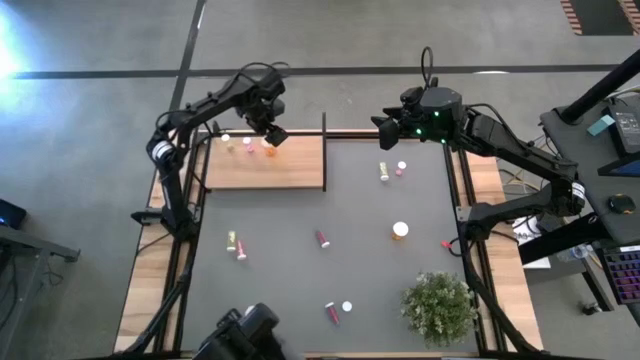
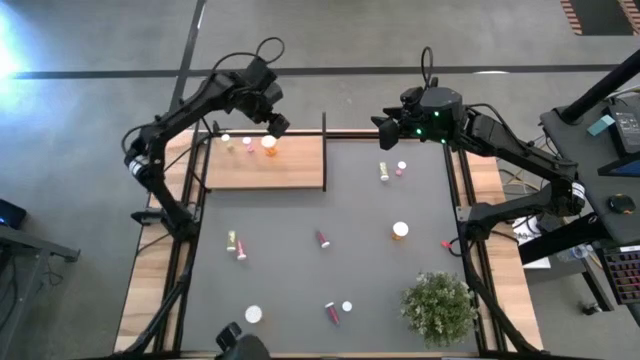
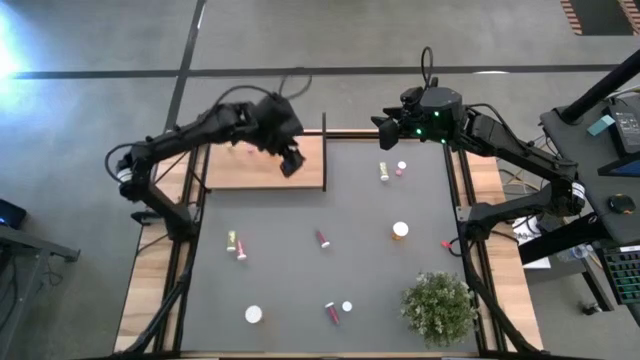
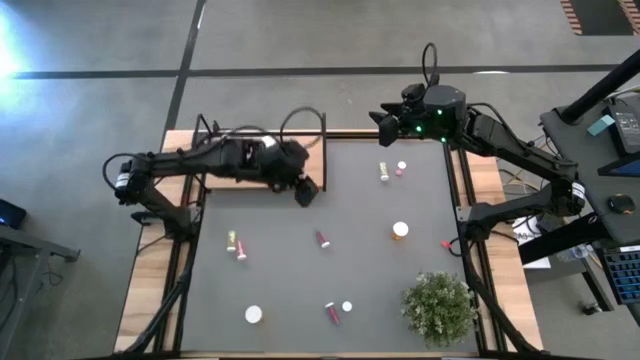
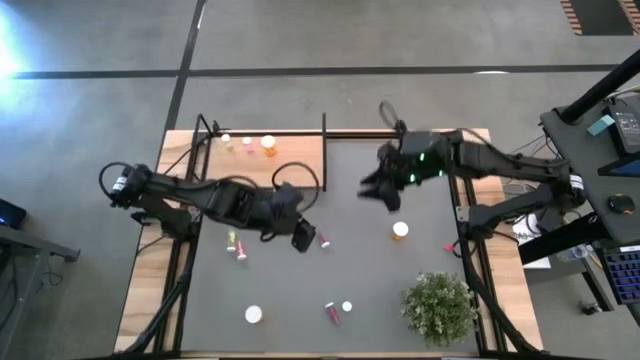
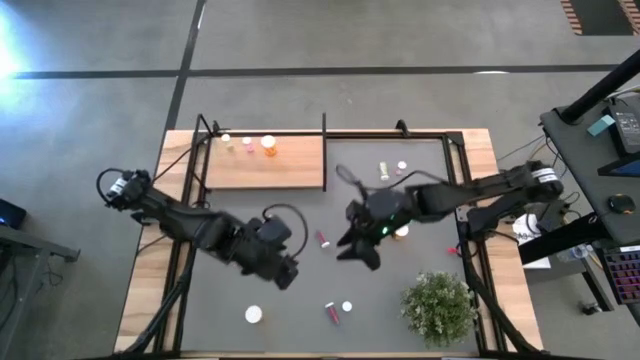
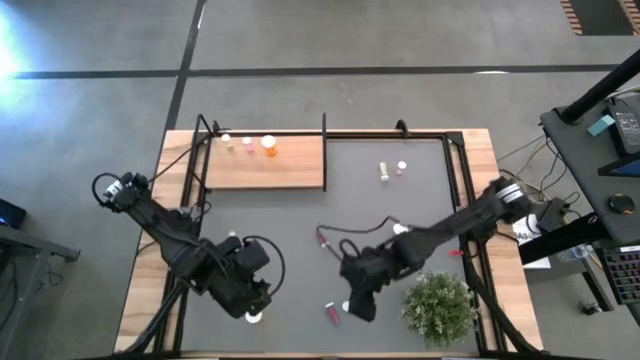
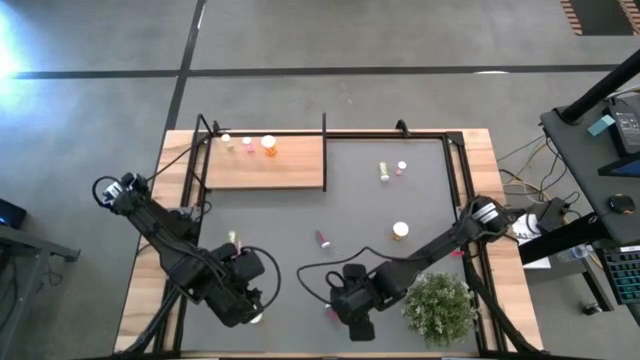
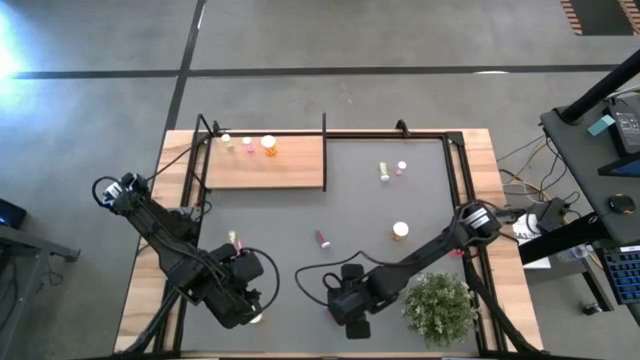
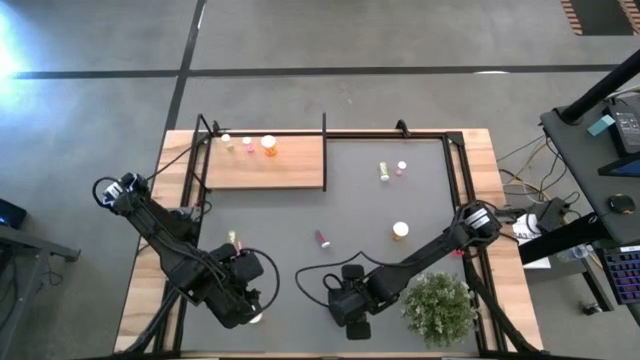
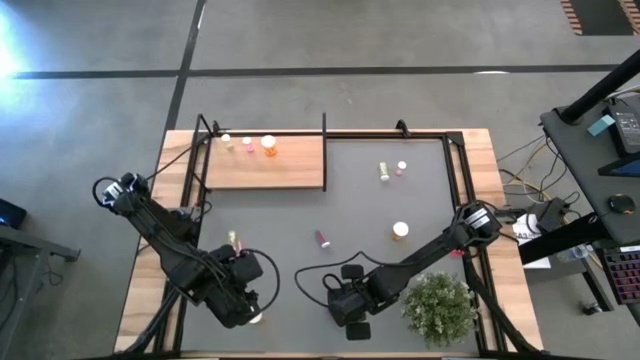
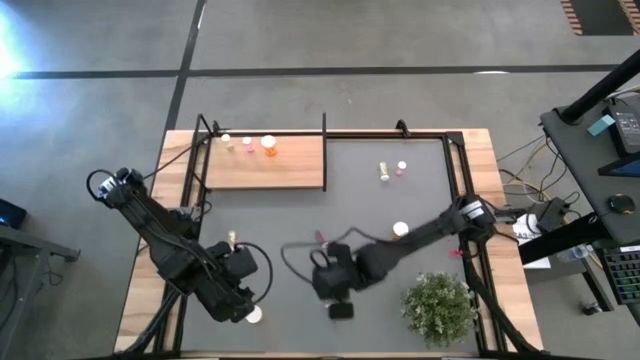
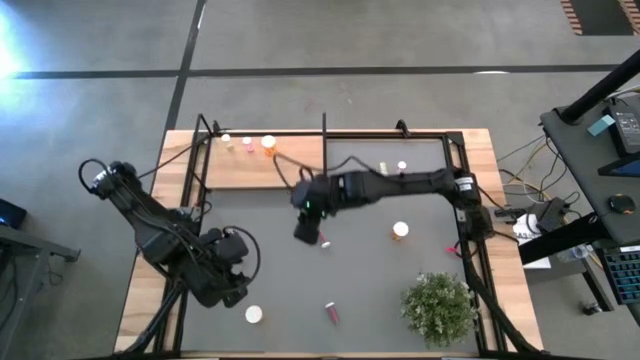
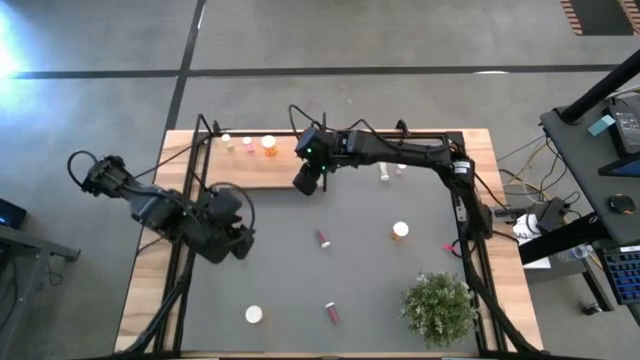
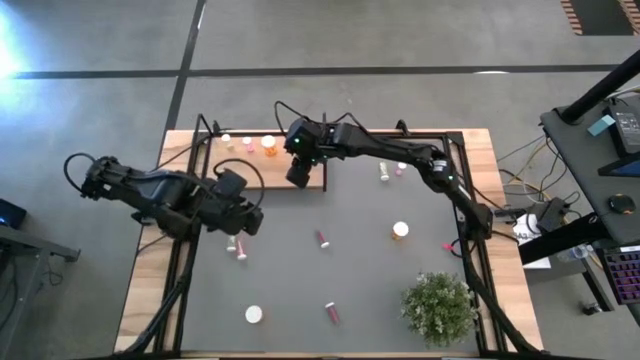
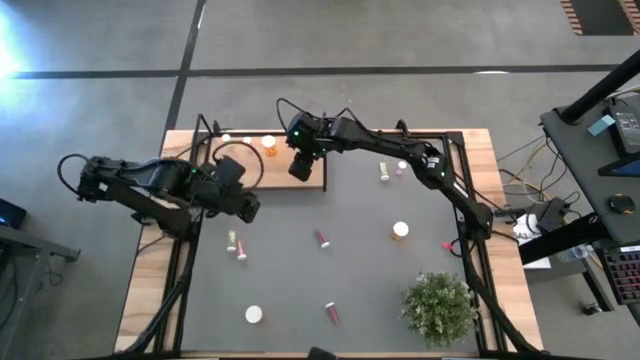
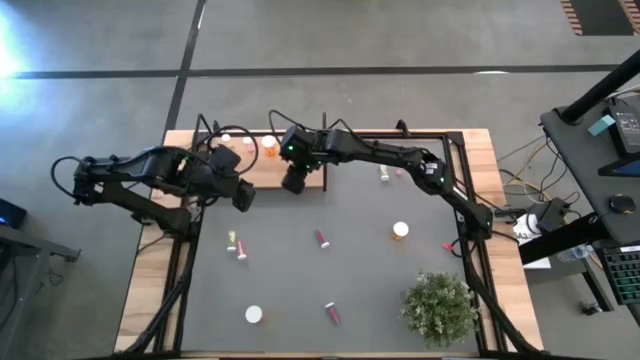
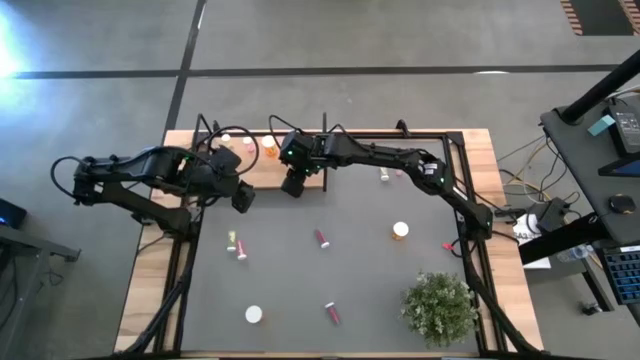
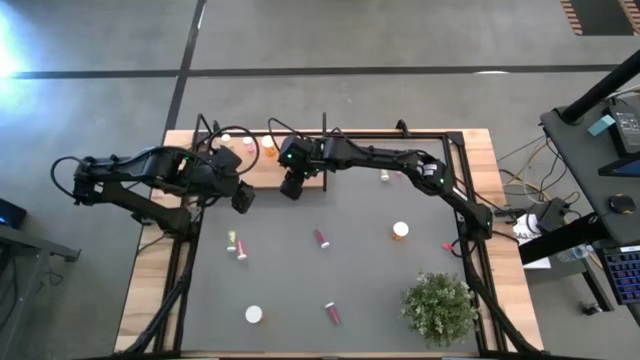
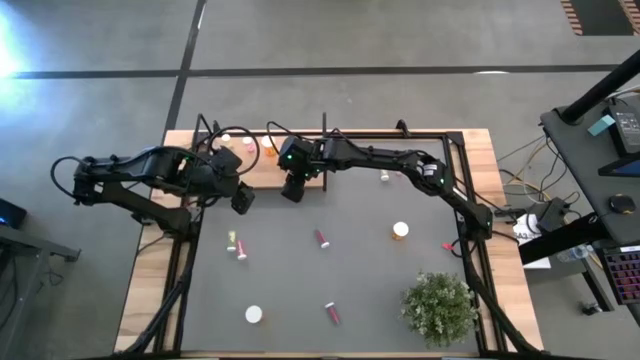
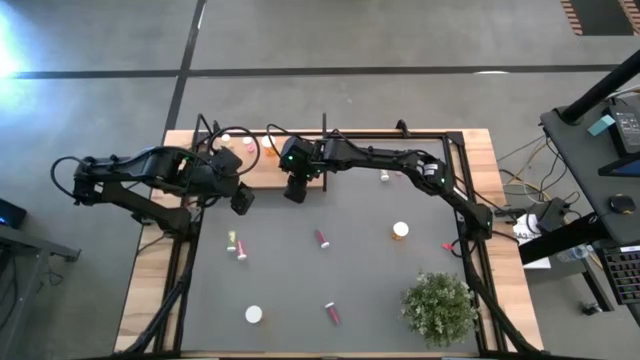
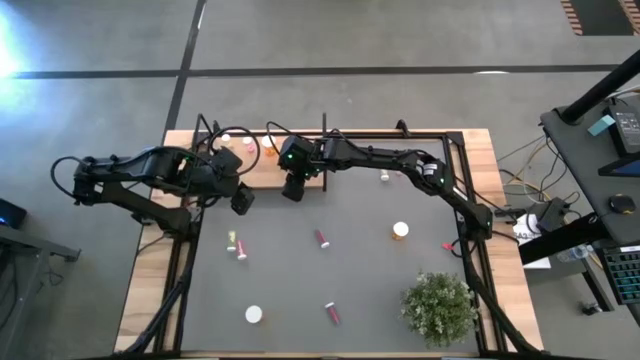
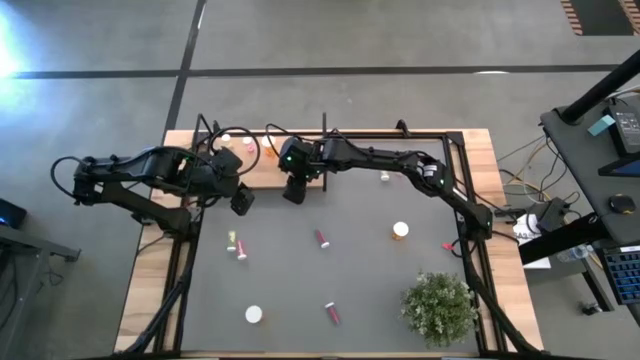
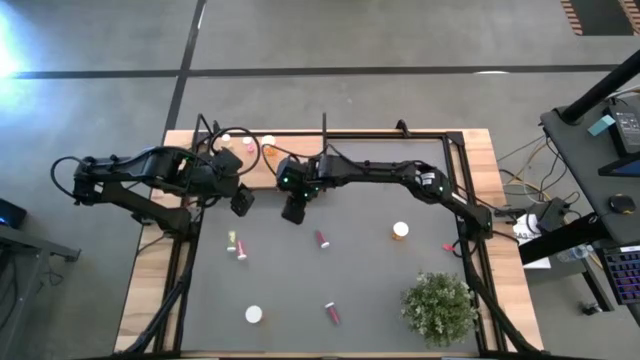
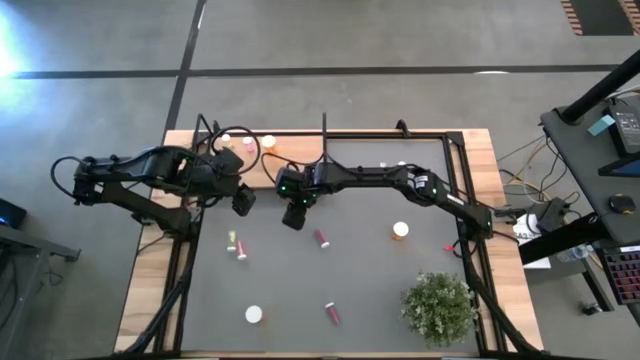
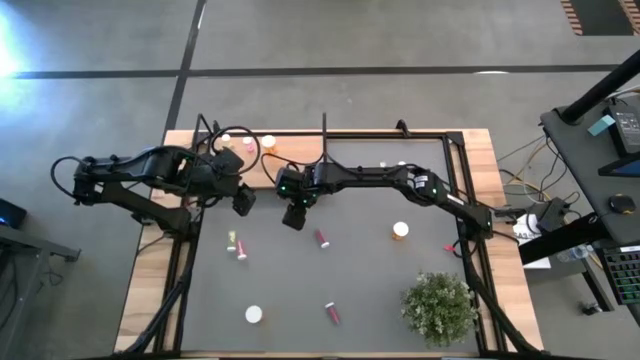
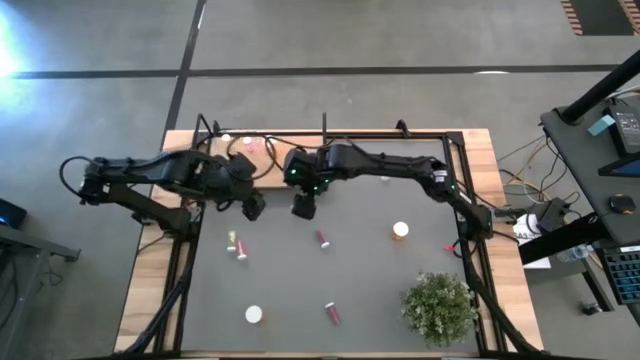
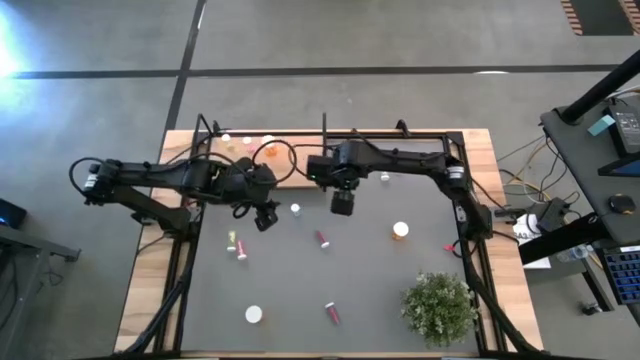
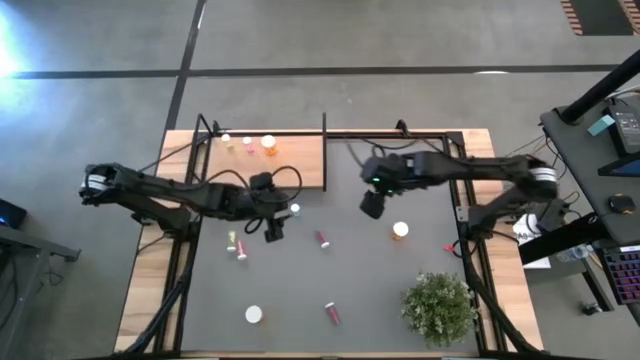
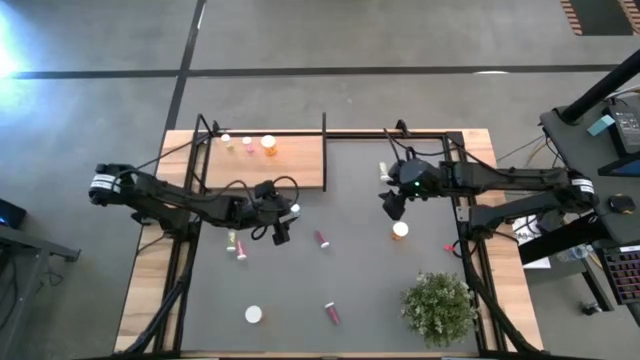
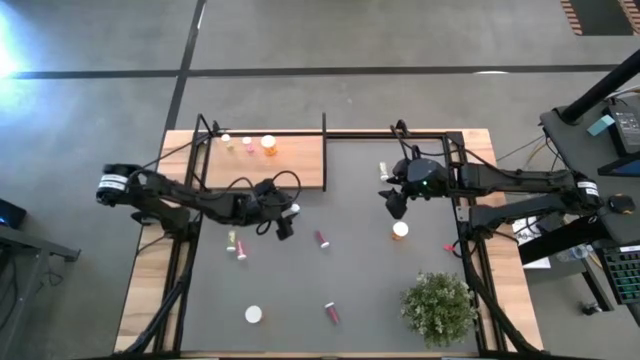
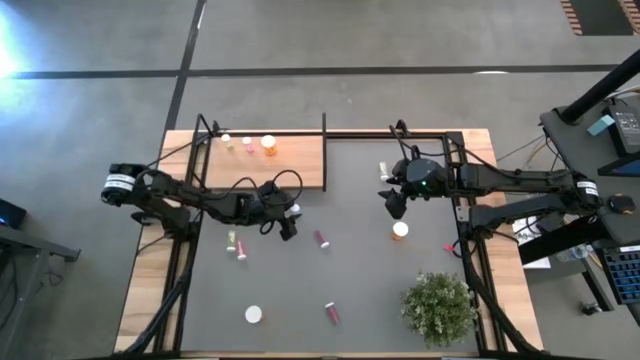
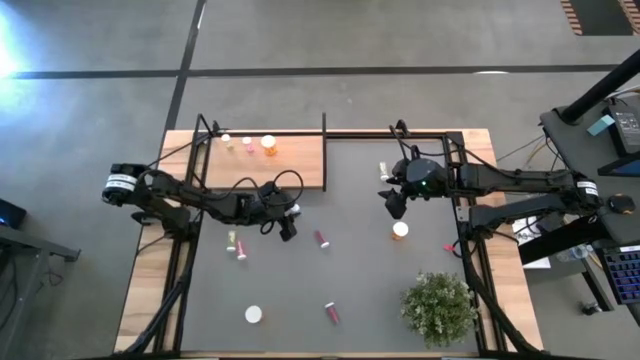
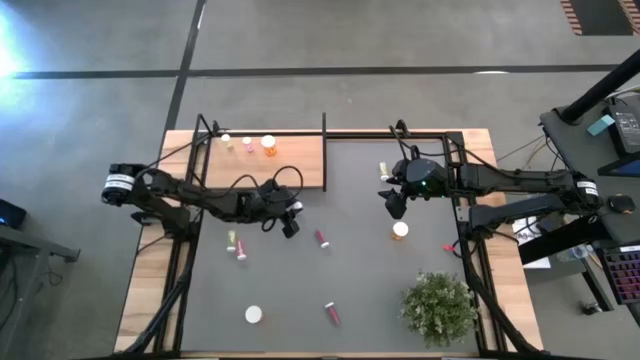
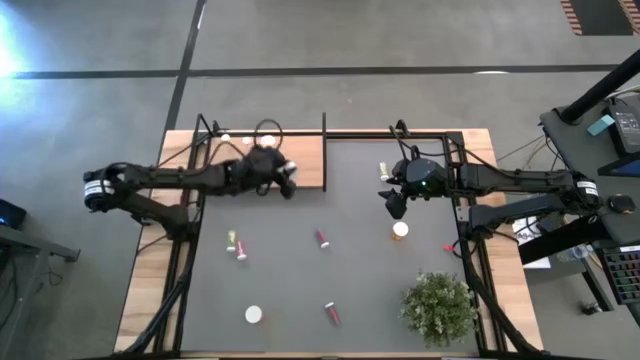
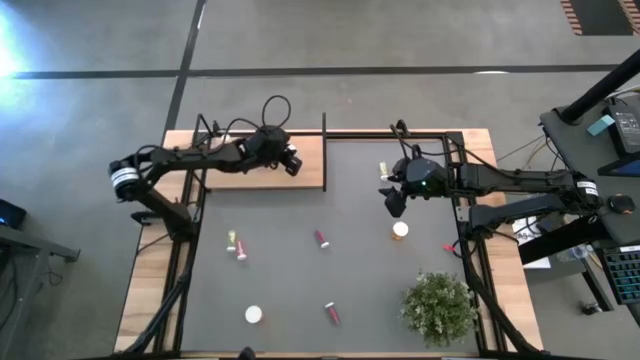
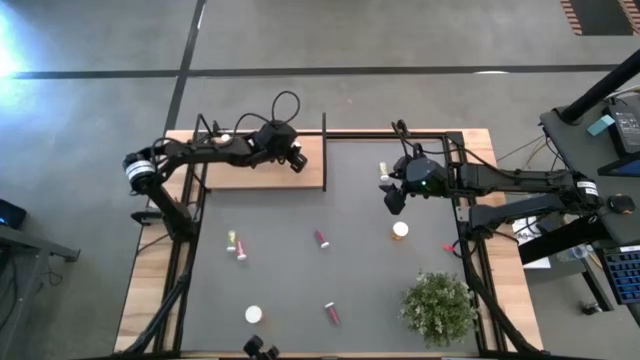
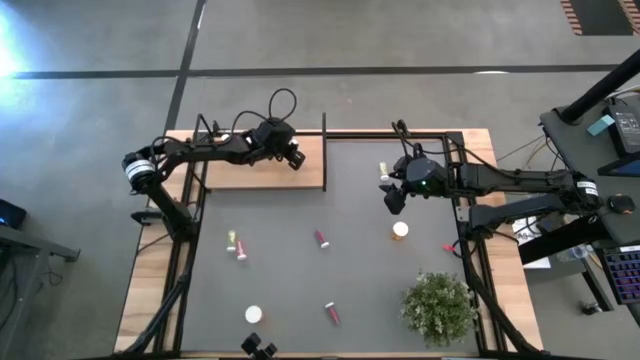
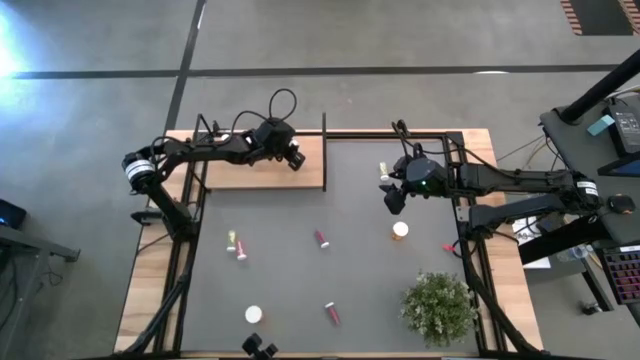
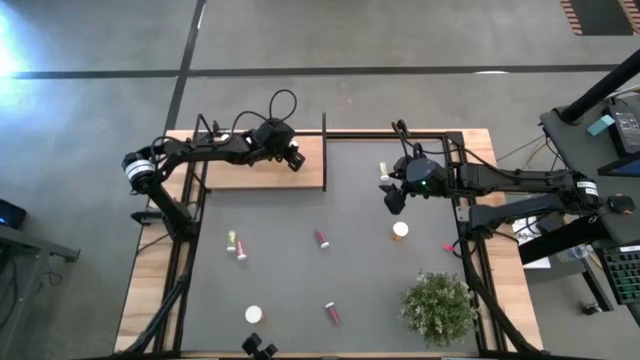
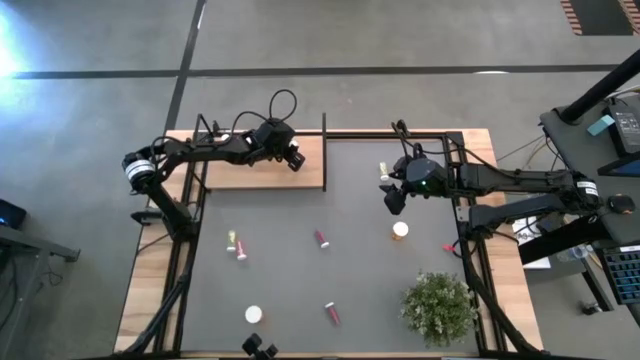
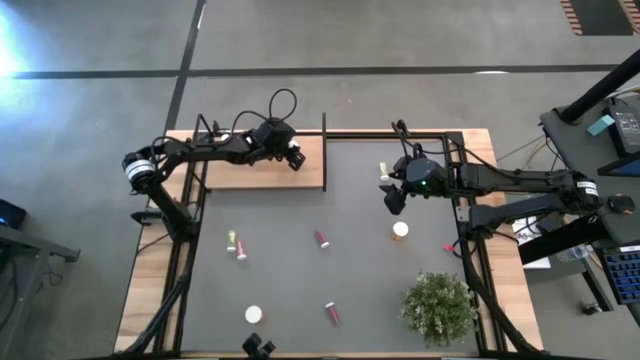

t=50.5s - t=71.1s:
Task: Pick and place medicine bottles onto shelf by color
Put the right blue pill bottle on the shelf
